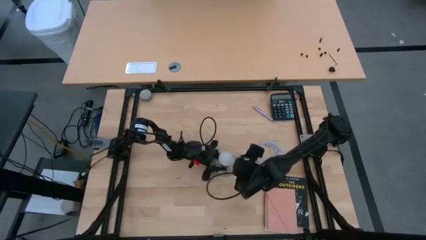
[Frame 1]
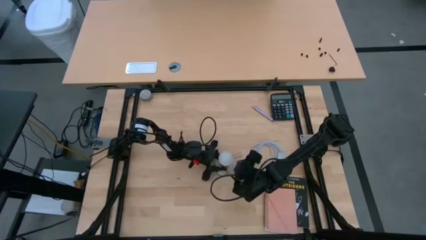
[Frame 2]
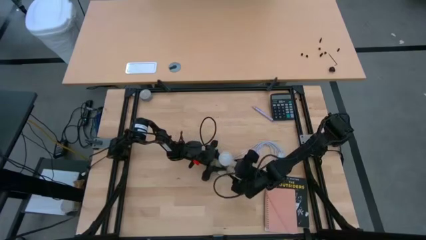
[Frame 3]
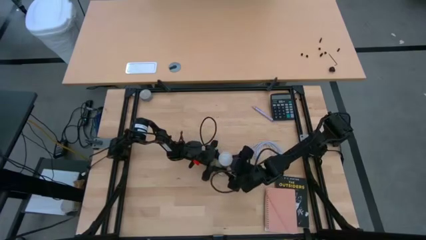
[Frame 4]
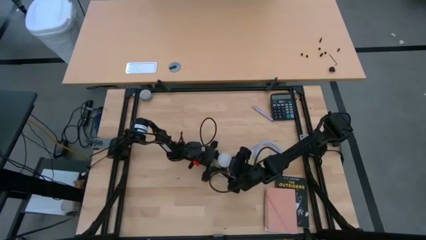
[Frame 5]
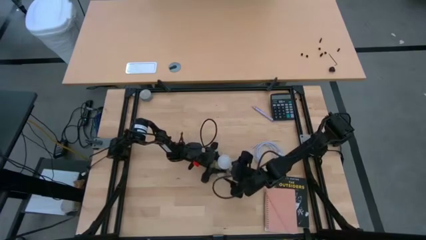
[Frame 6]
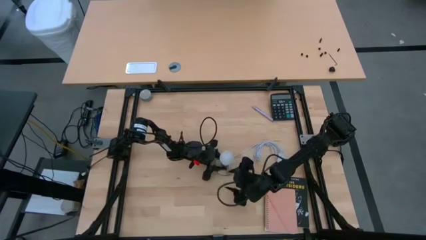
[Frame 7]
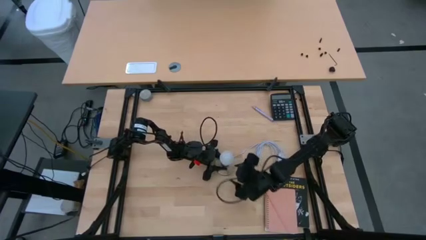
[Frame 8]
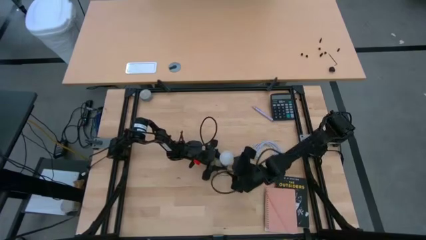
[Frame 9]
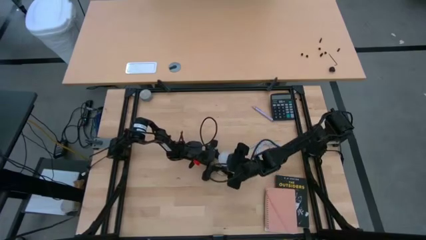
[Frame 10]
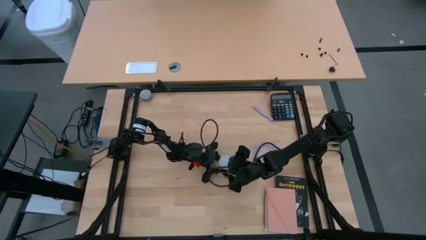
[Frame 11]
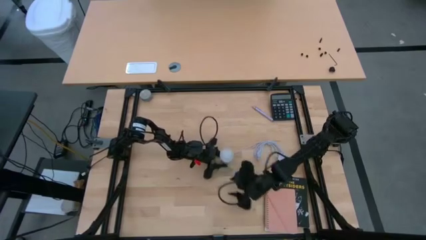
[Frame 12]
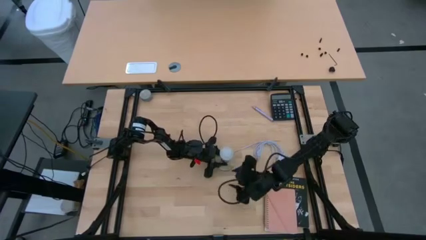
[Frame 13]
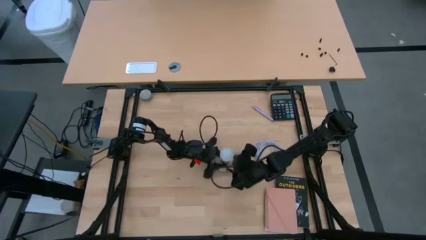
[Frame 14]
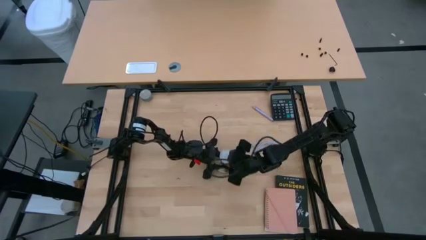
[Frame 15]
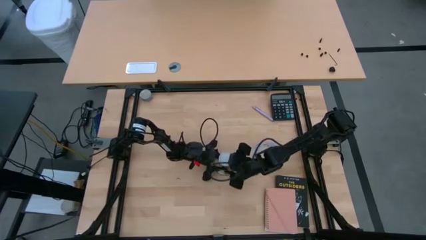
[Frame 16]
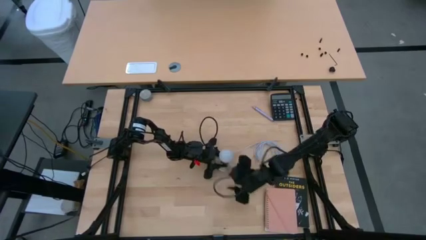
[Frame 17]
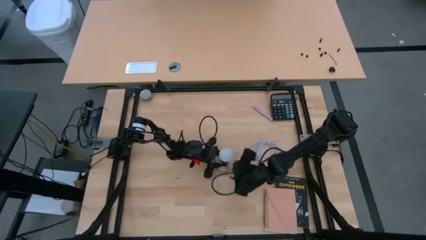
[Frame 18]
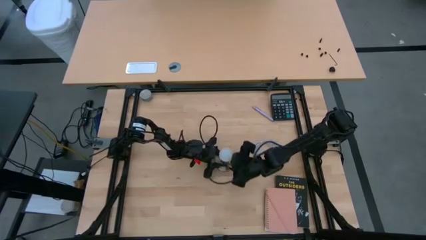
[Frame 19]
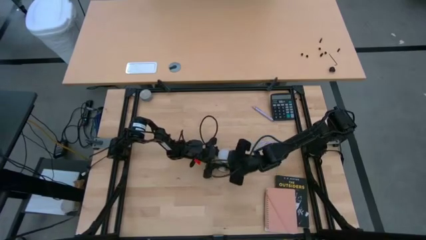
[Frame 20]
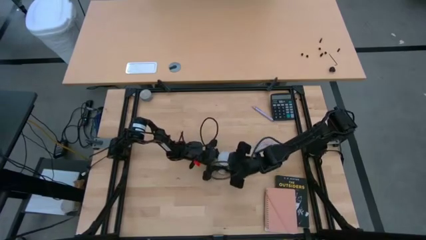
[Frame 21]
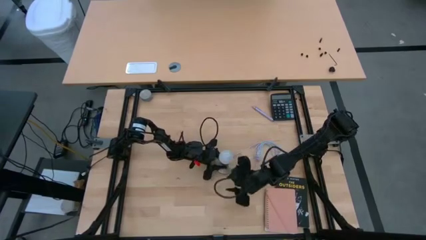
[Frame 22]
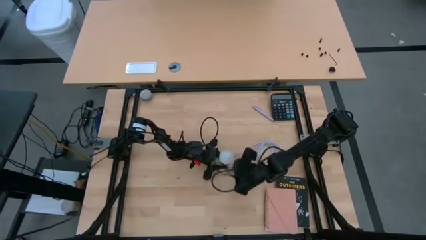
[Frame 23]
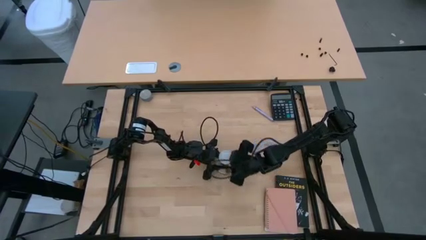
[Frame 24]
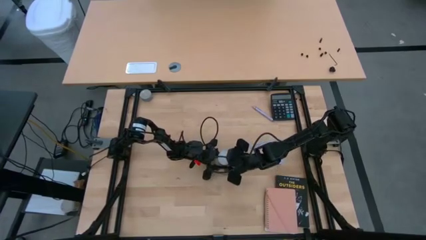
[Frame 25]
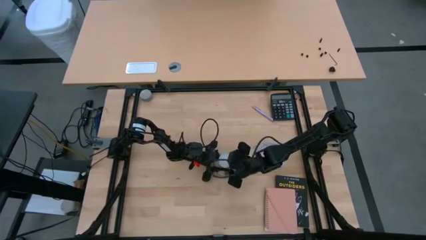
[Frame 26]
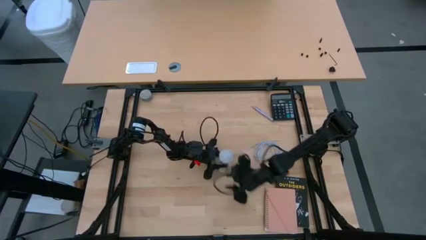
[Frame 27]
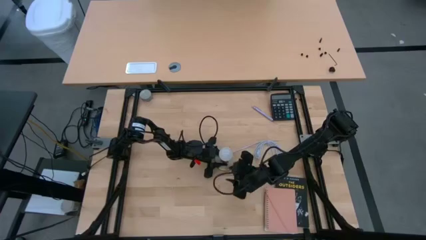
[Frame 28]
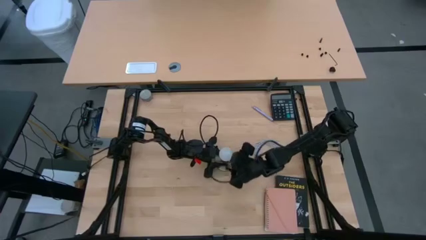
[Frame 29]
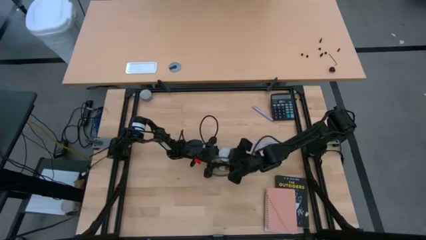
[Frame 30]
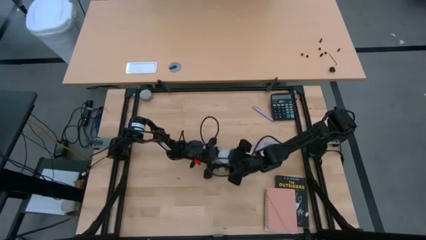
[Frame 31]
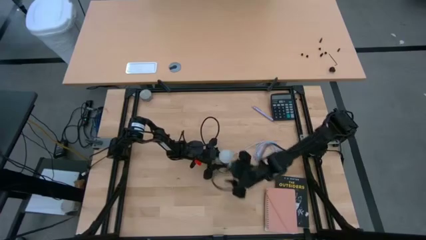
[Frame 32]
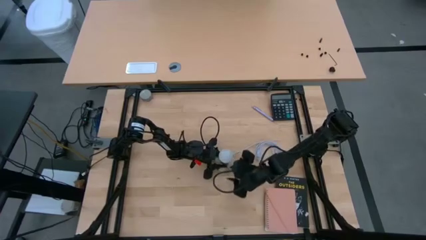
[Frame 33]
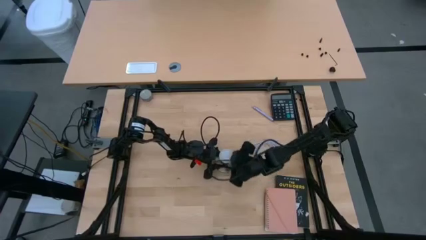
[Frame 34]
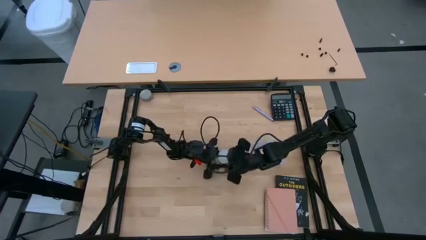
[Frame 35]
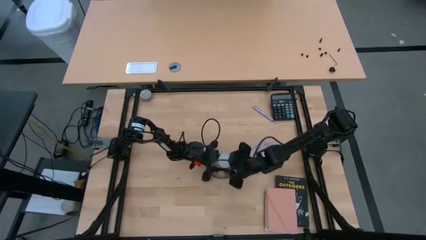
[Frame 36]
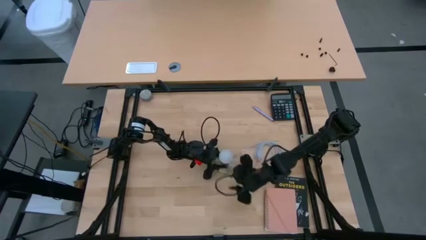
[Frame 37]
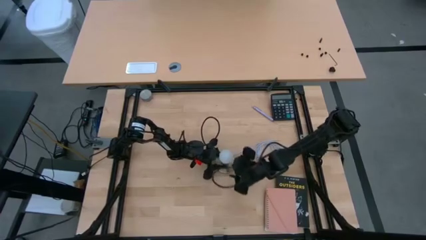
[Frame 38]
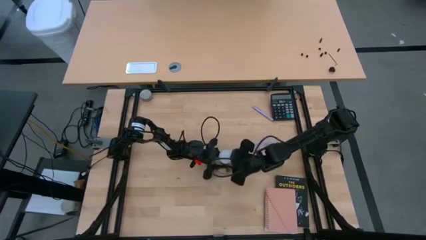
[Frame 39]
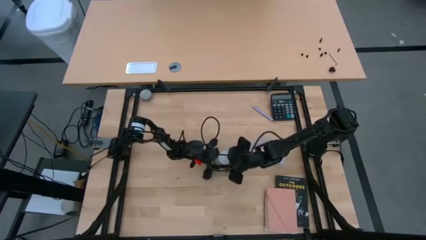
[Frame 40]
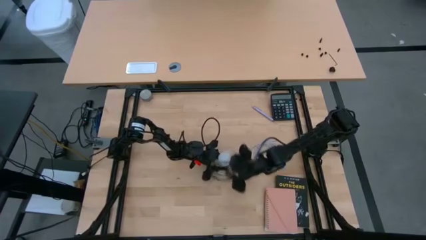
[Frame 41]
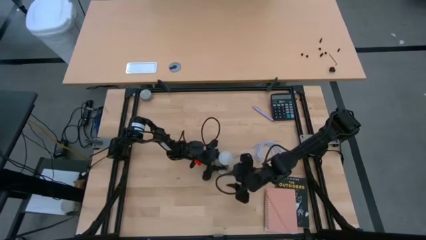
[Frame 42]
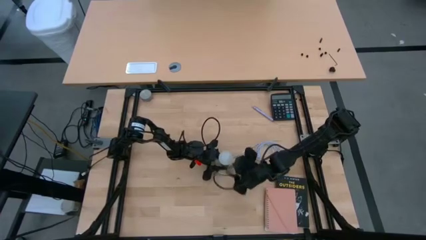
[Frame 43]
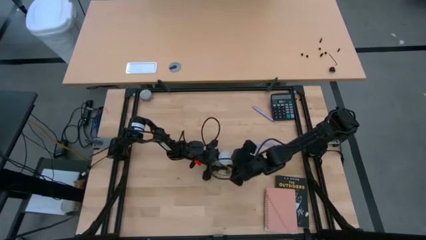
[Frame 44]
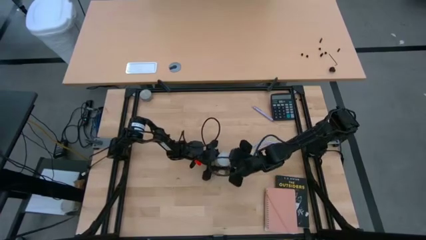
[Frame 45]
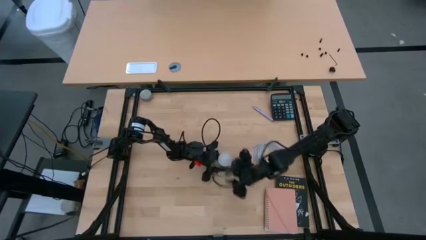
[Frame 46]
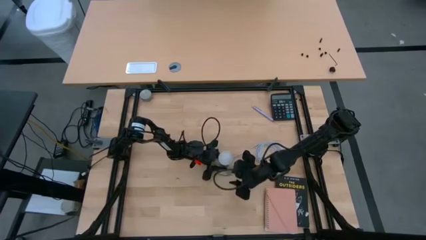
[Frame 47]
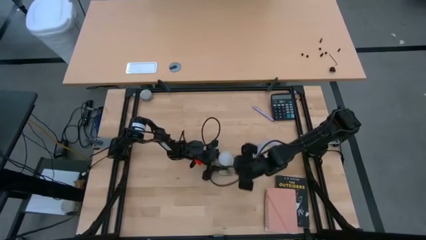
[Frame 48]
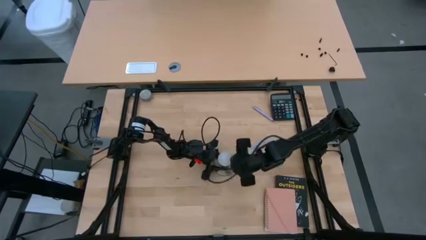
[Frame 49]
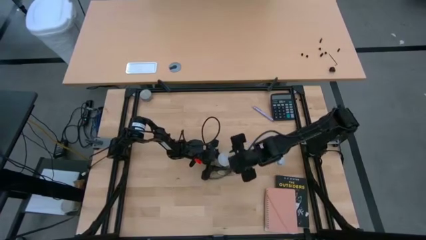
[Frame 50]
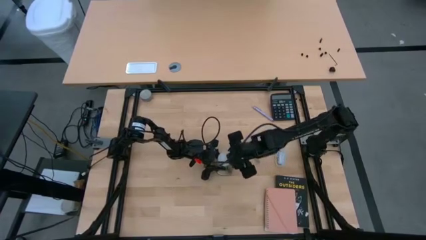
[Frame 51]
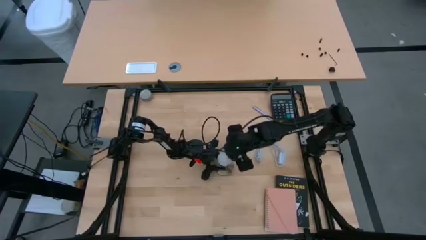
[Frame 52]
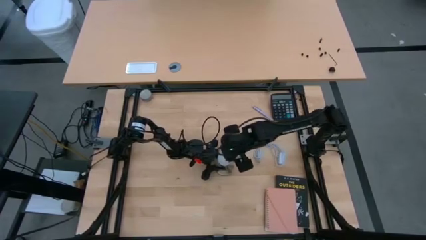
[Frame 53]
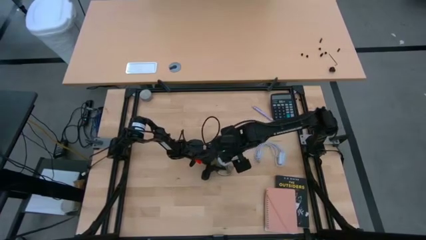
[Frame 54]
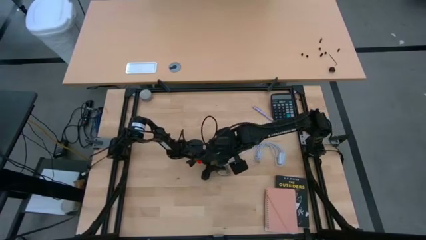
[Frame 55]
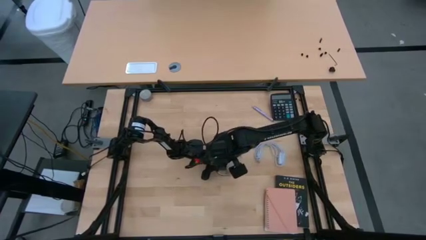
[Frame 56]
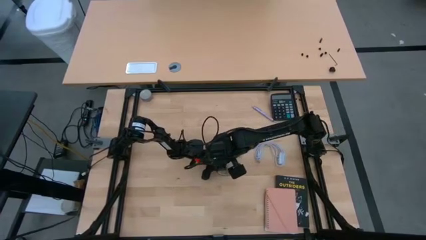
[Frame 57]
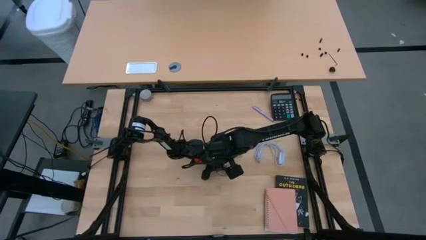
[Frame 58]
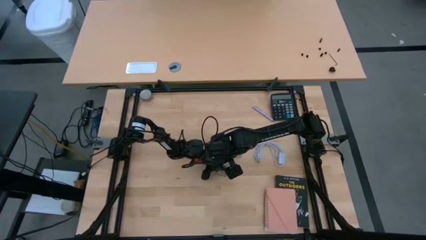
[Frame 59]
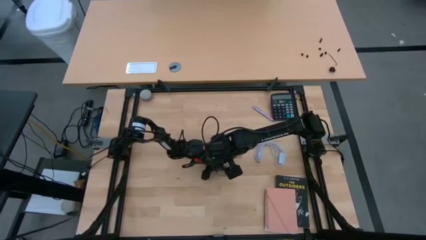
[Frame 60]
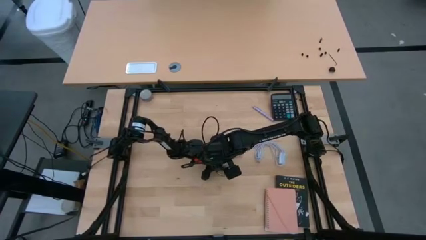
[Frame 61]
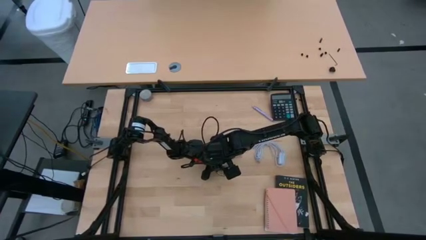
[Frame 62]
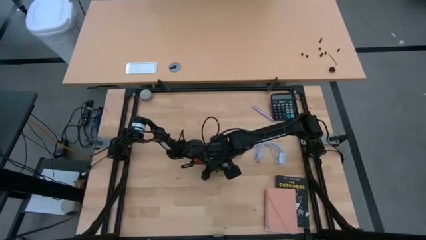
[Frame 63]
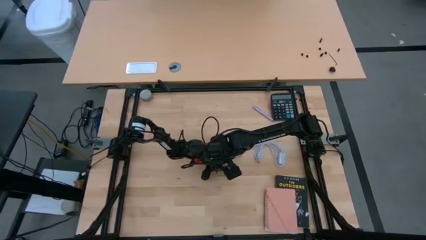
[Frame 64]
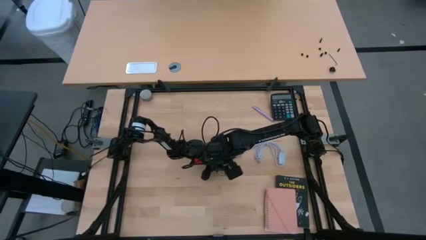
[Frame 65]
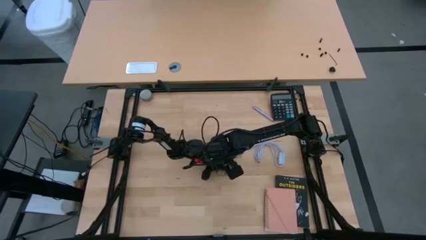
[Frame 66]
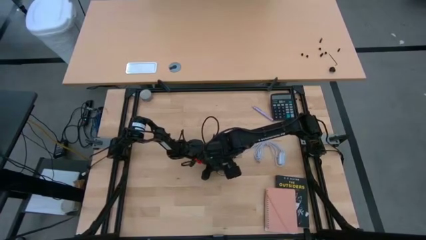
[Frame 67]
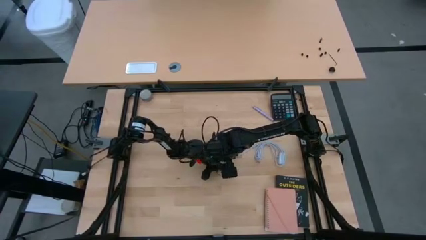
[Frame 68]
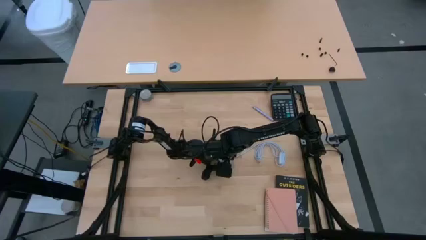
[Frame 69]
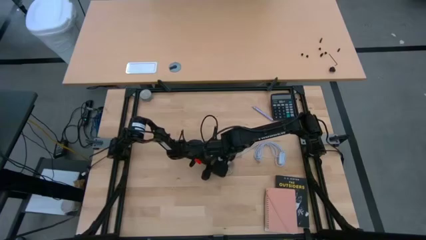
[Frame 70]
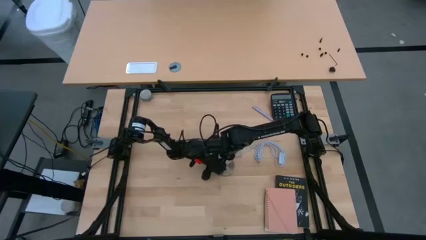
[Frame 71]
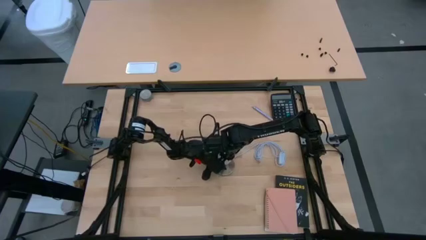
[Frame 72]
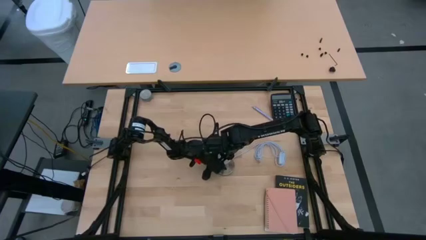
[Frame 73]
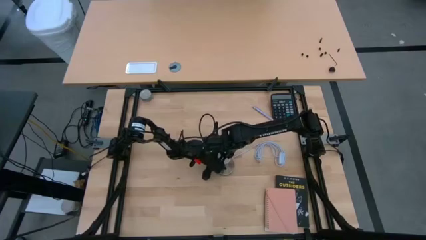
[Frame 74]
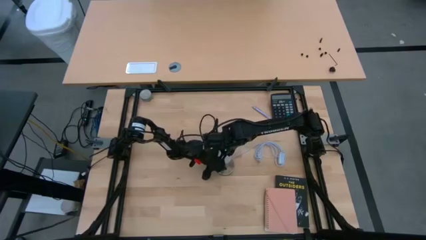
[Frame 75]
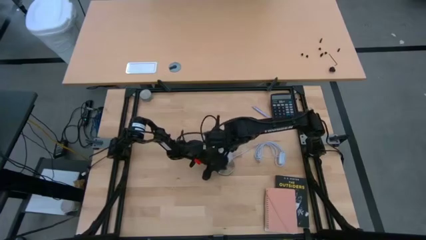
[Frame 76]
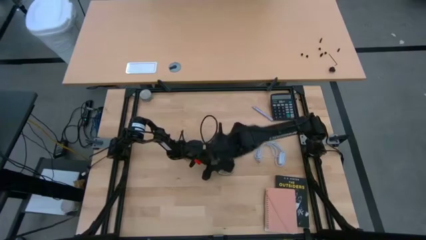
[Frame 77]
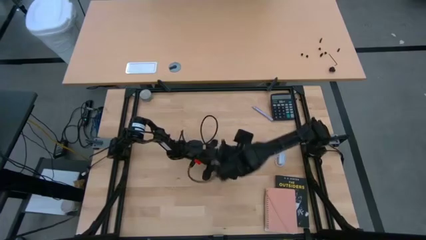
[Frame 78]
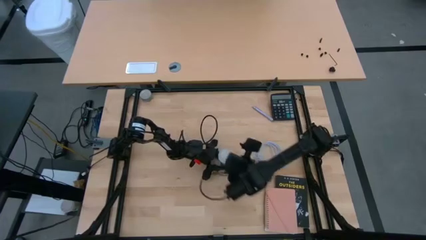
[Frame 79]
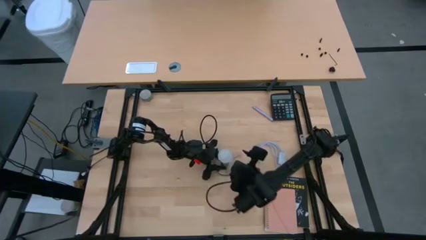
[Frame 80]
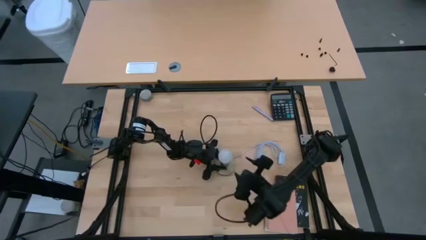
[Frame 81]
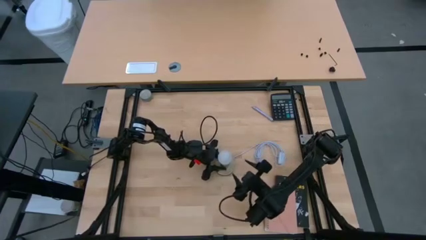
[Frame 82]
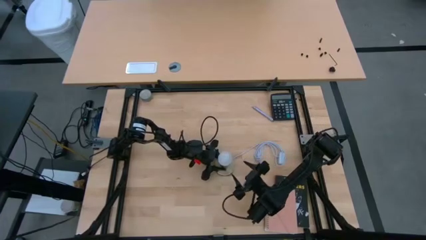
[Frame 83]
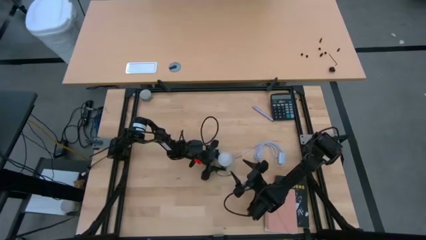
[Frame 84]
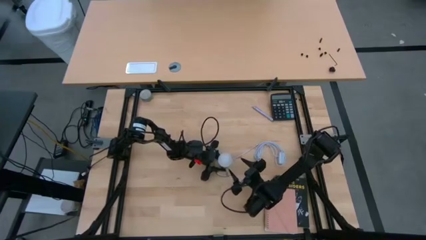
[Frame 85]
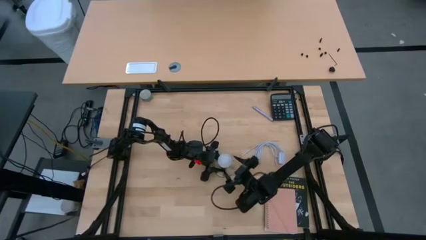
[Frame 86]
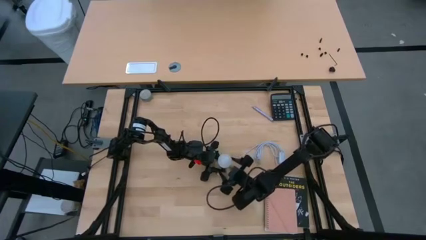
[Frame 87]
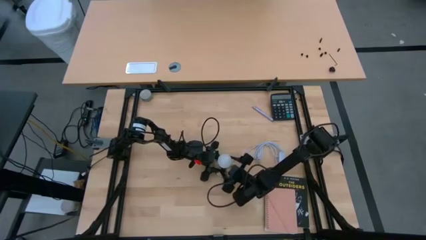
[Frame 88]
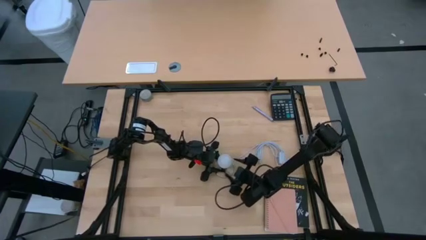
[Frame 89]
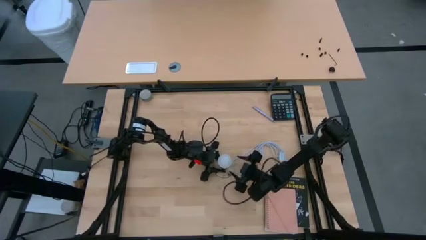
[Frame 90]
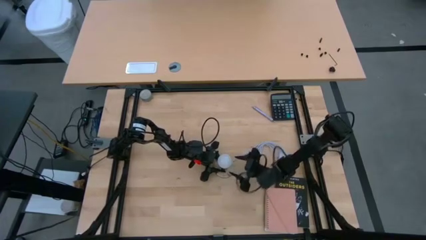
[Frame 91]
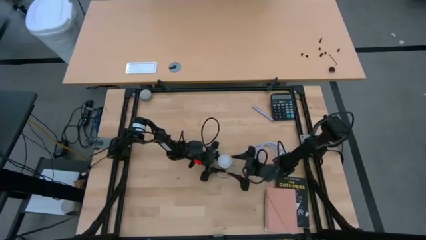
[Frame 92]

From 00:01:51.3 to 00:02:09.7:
Task: Screw lightbulb
Insert the light bulb into the lamp
